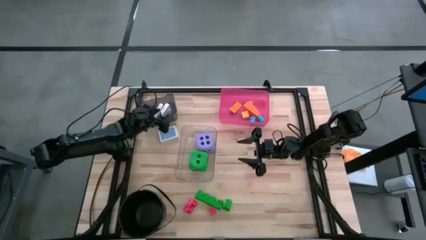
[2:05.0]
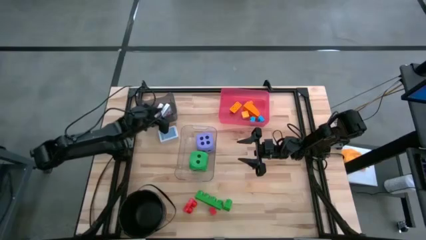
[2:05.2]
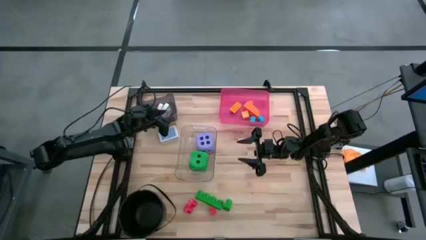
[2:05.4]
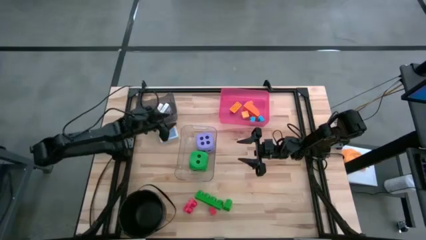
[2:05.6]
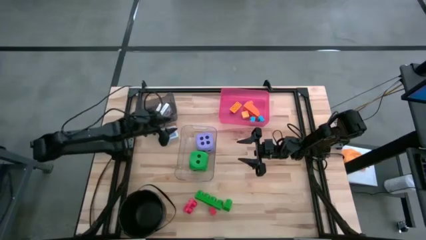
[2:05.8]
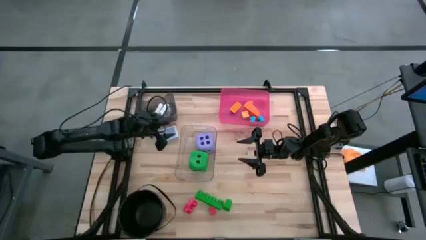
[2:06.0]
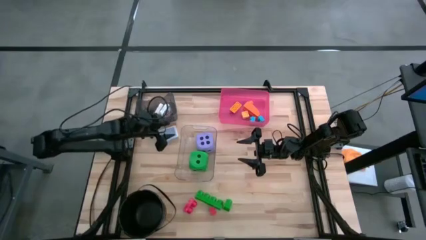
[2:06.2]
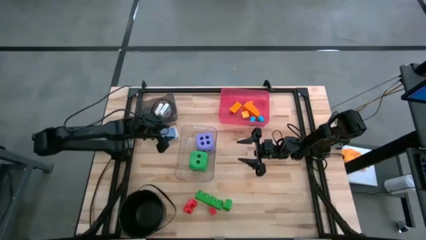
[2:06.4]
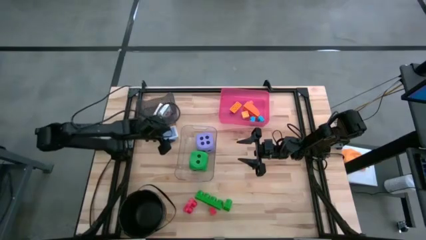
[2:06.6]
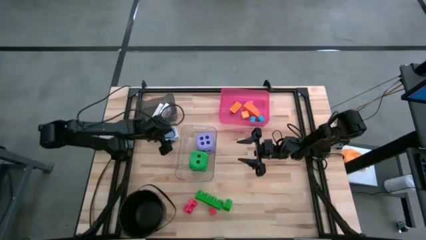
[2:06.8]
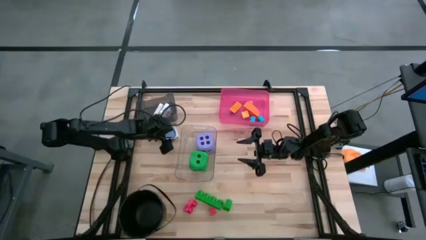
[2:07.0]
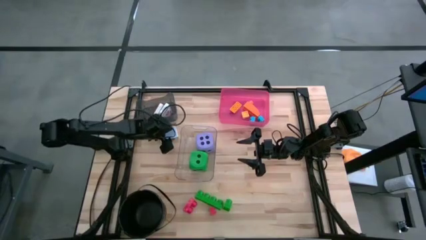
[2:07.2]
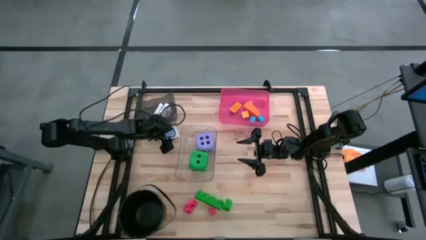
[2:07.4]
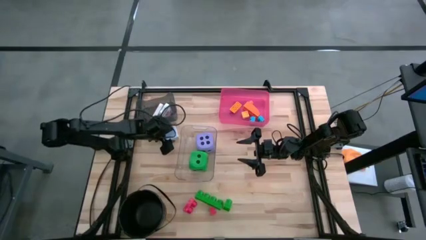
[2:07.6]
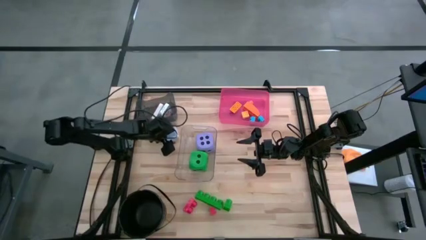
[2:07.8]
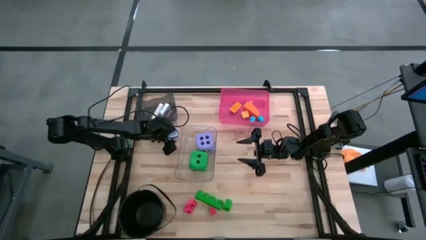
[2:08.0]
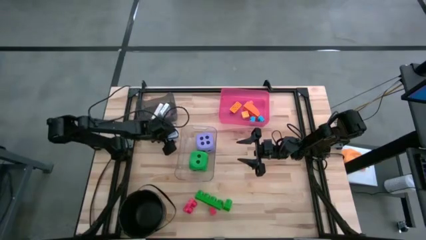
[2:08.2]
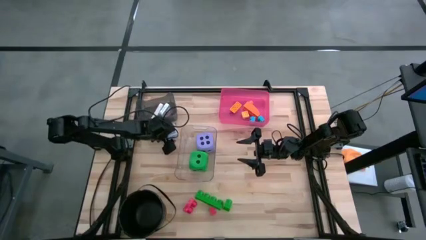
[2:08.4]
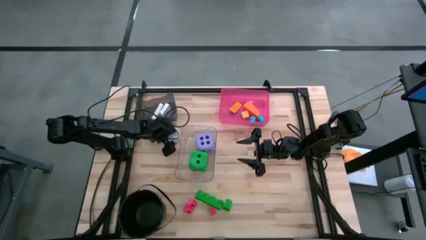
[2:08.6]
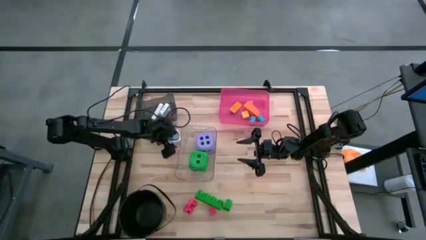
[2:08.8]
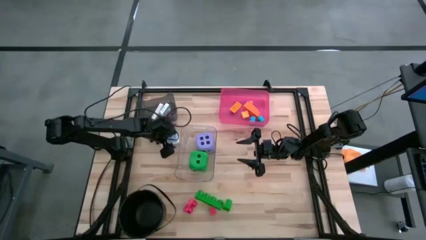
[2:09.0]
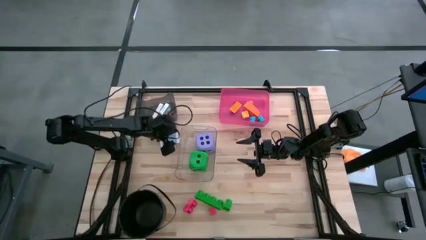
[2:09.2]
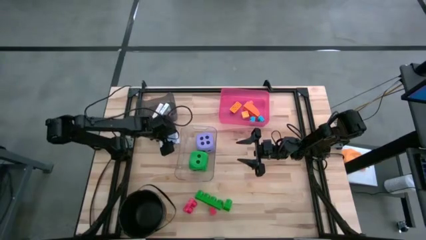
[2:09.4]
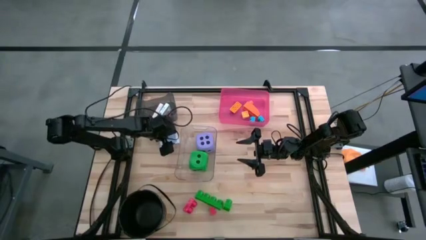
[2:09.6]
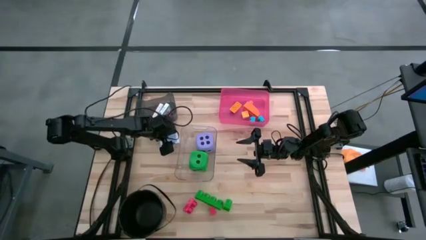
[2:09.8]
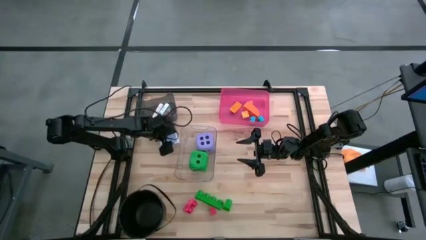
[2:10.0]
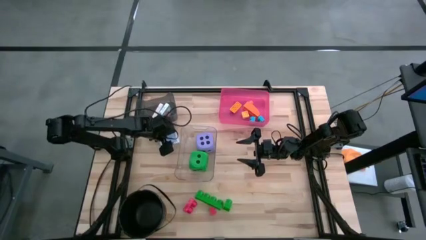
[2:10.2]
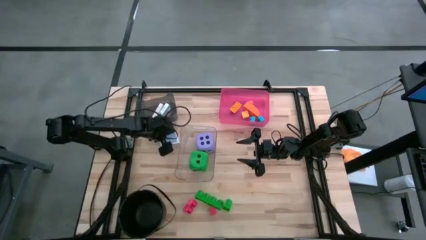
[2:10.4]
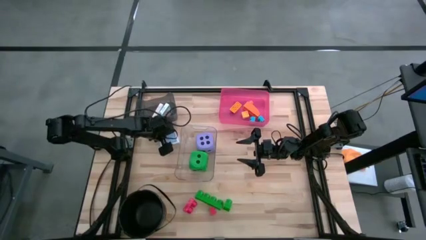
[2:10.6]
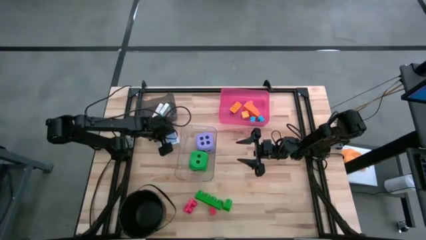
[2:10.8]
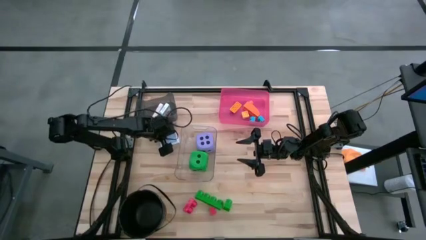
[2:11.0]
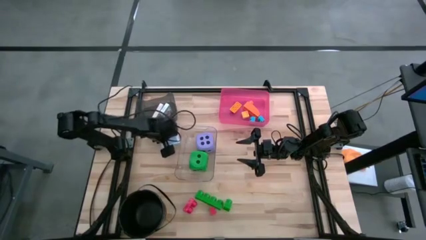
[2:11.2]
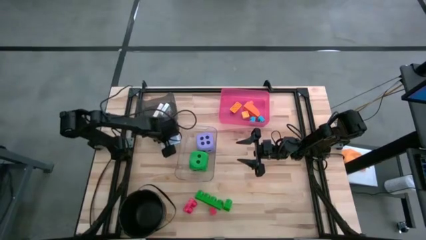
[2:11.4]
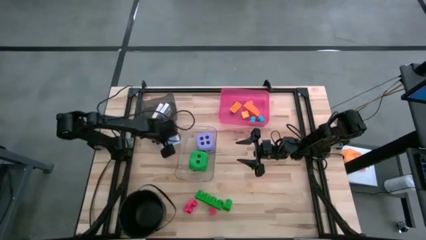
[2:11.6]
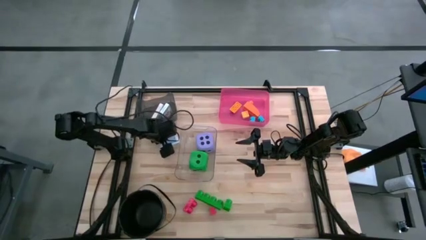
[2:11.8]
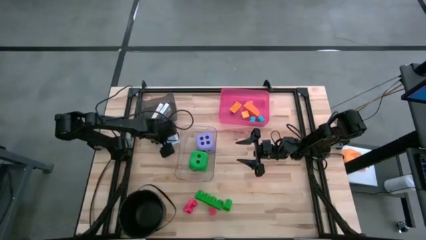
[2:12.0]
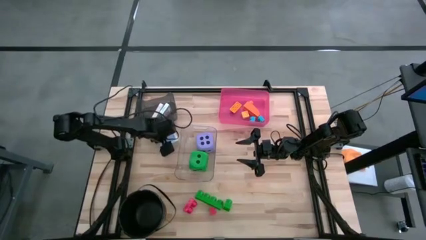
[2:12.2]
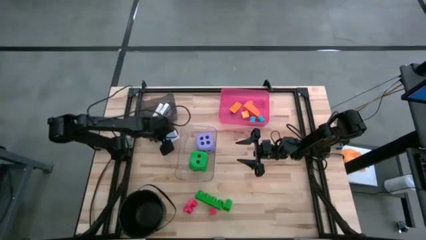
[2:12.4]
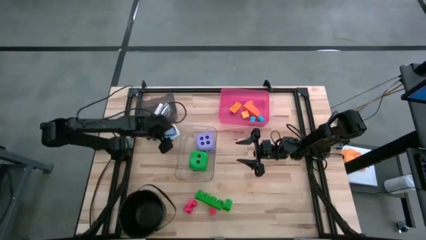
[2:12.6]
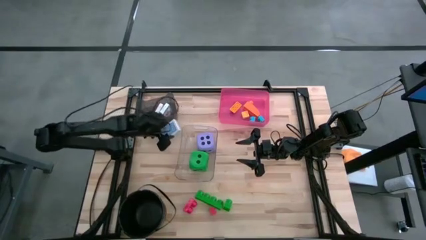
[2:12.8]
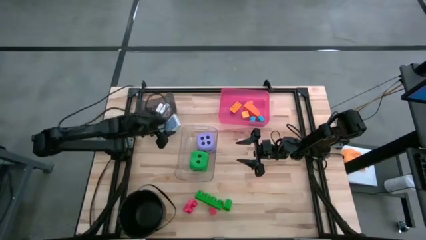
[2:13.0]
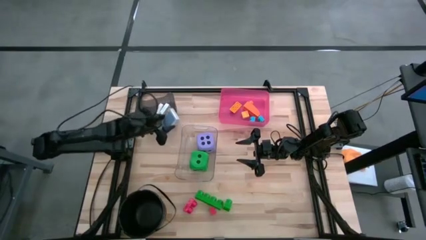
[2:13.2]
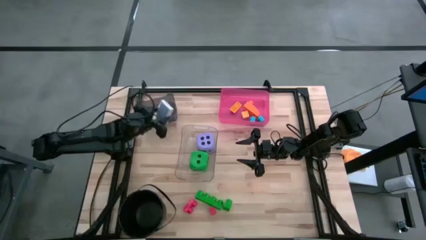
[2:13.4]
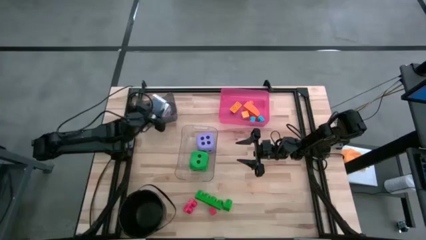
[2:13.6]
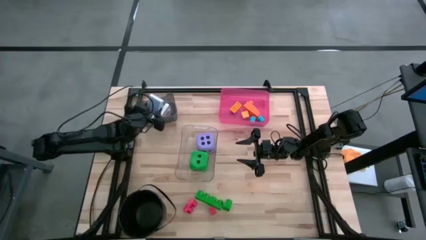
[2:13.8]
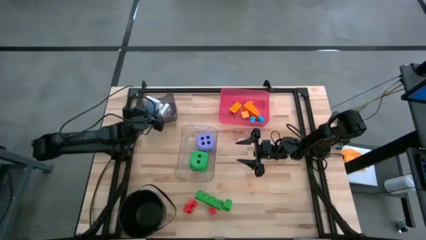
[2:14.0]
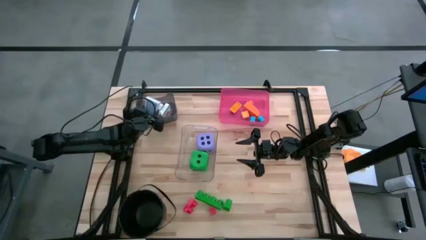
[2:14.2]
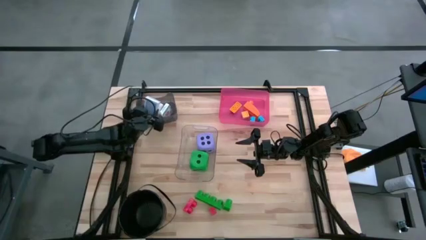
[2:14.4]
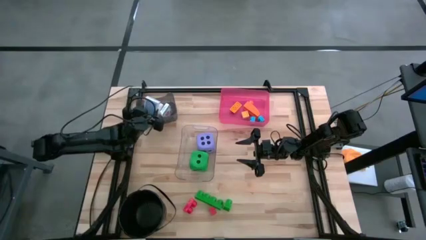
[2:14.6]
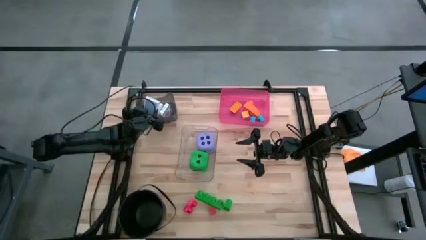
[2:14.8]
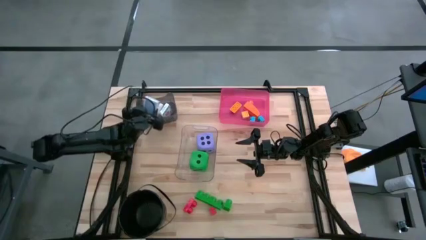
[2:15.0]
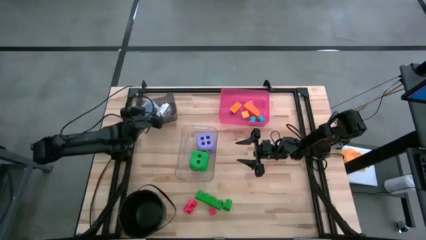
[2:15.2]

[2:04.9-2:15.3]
Task: Pick & Place Toys
Put the blue deck of cards into the black bin

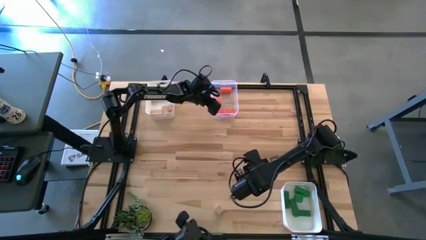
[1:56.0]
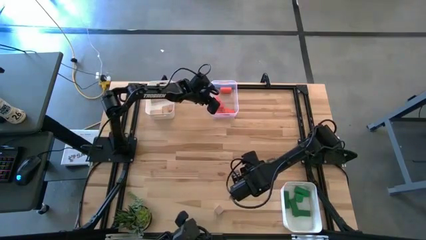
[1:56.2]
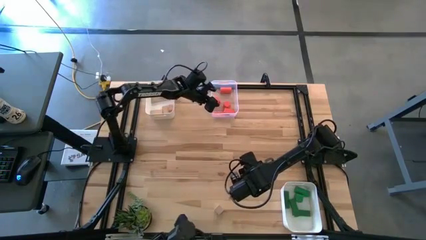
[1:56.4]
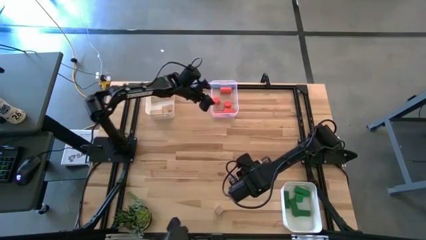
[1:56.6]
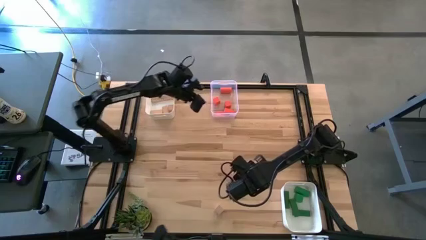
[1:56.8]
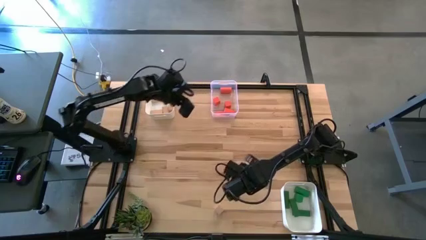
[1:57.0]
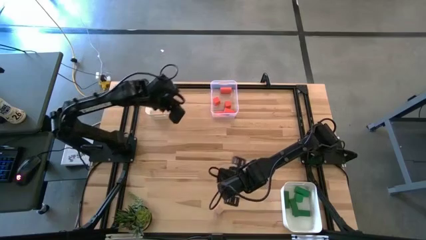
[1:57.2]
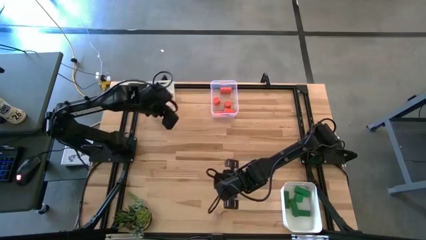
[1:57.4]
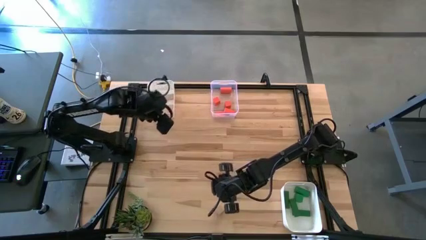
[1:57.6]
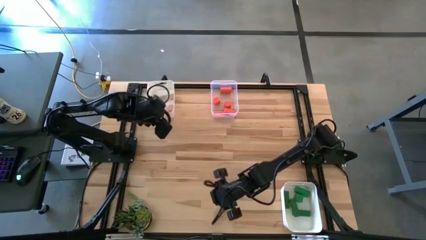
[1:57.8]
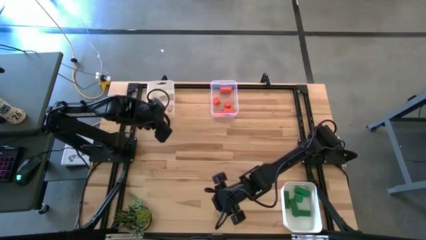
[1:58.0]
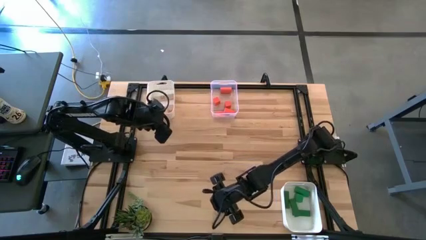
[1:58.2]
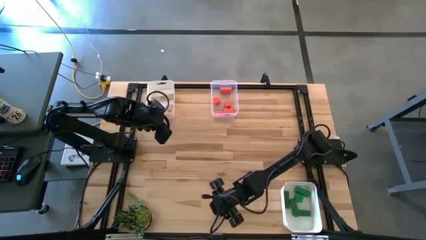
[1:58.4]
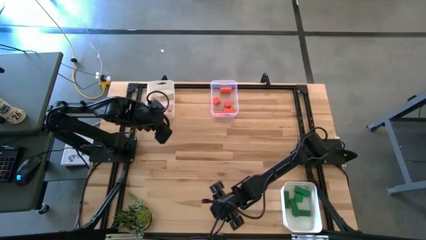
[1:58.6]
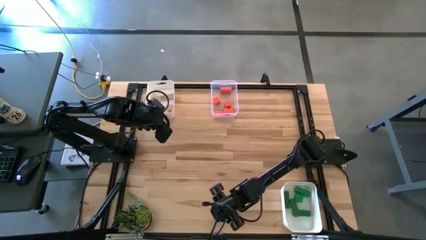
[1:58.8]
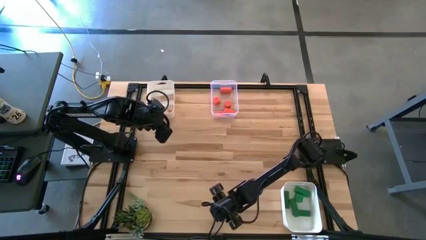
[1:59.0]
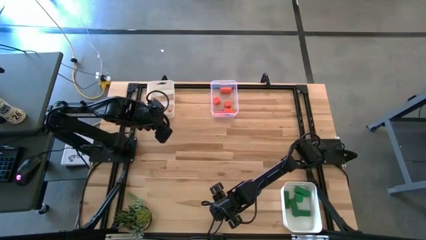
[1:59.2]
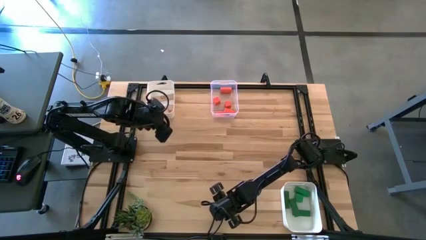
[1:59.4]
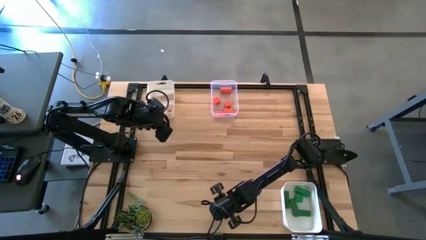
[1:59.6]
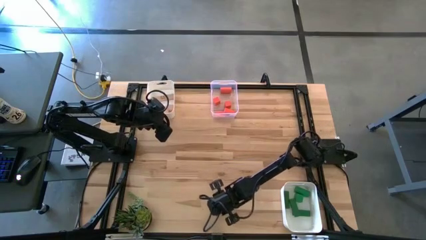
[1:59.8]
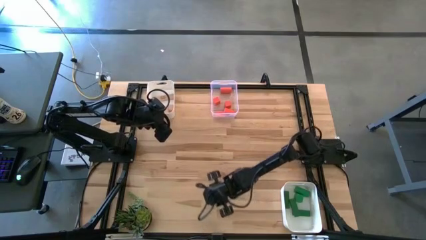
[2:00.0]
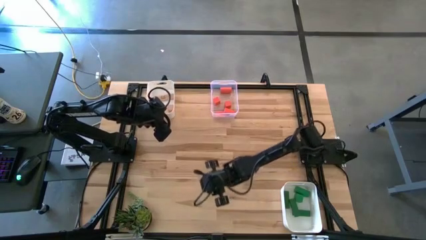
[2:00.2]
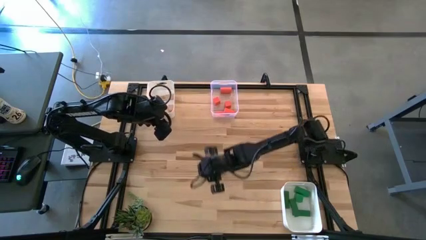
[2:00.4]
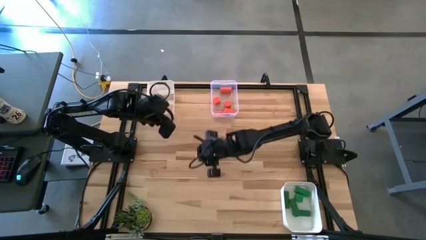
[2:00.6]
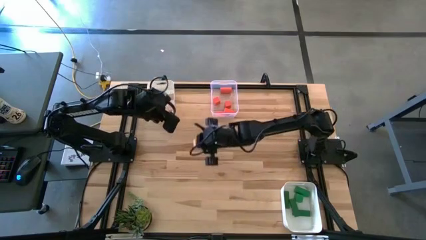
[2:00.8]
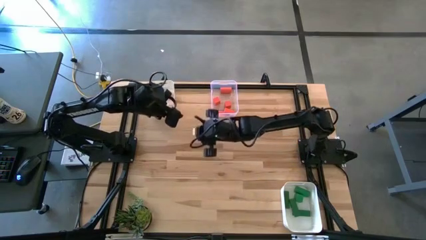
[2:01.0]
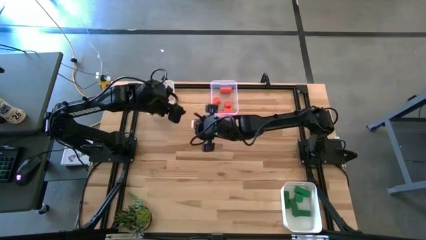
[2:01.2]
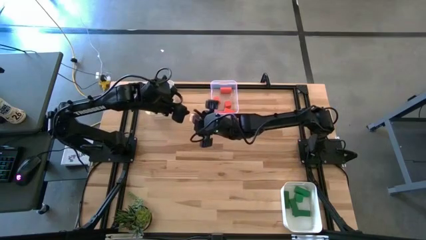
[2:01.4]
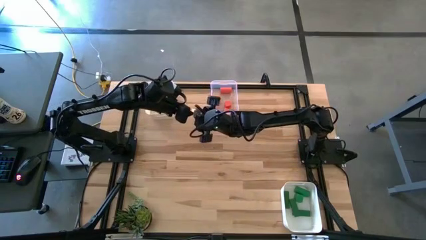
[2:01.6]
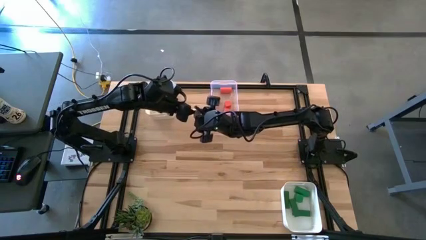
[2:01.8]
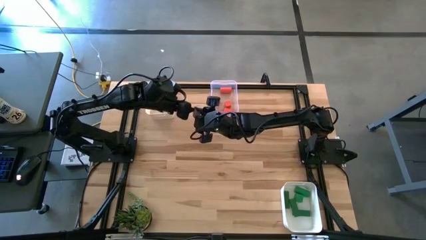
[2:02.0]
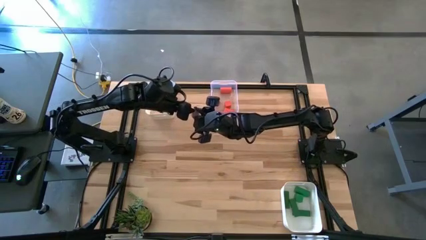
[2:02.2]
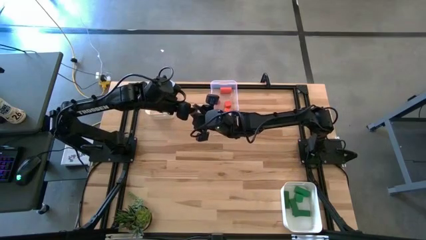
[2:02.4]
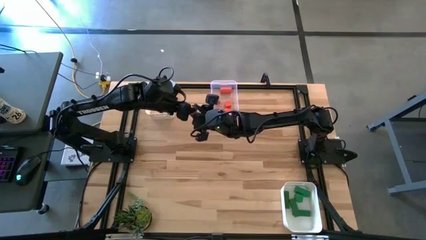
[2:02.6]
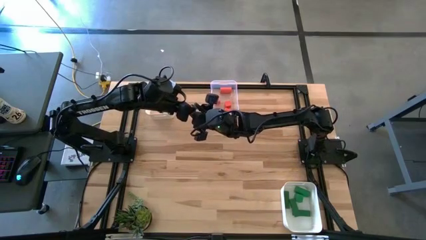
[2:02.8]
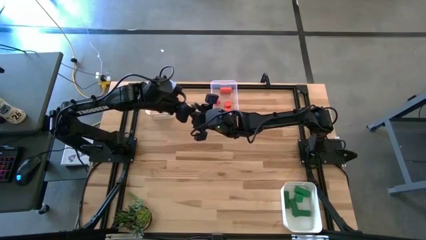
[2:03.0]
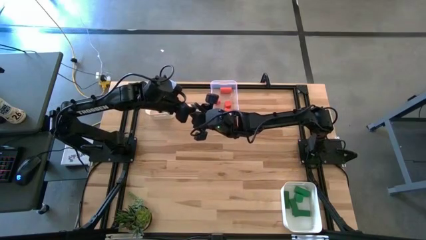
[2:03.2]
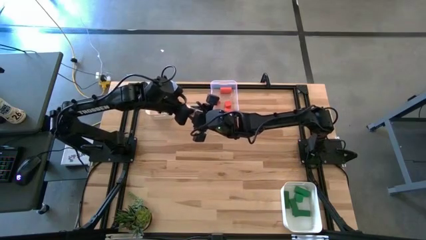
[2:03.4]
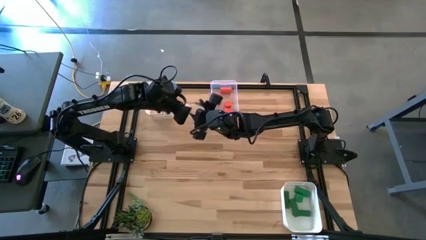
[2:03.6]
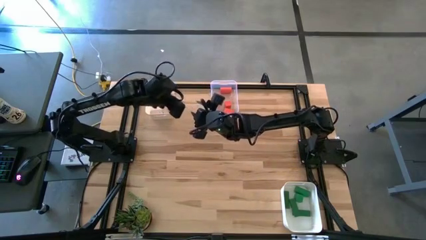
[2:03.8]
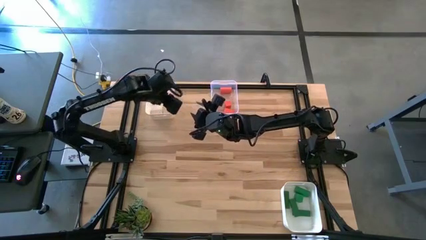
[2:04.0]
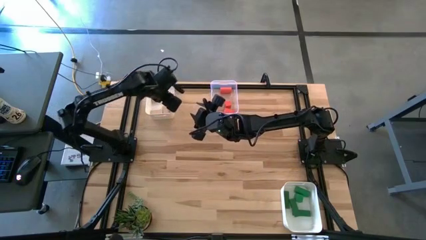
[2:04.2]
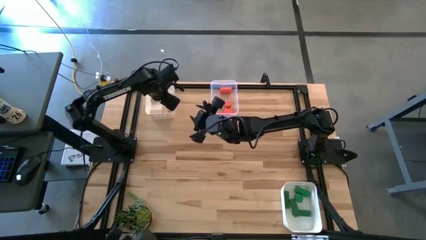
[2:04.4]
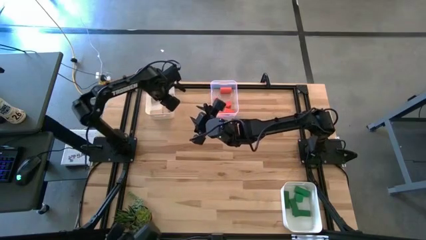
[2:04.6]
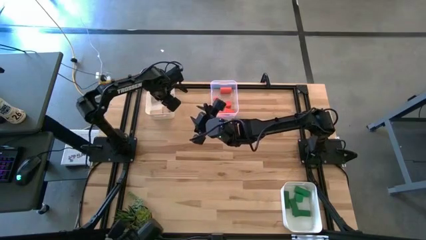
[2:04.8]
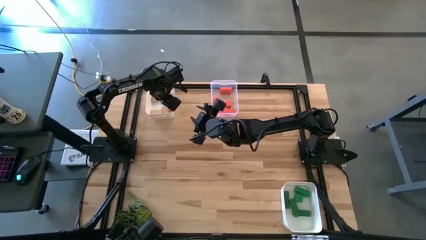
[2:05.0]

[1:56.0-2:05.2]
Task: Sort & place blocks by color
Put the brown block into the top white bin
